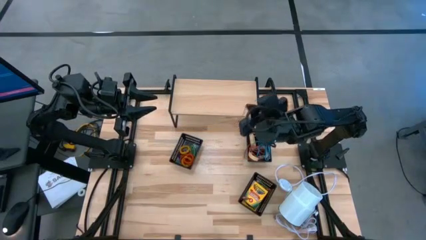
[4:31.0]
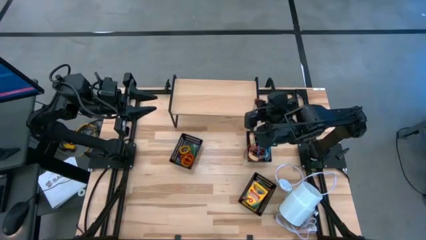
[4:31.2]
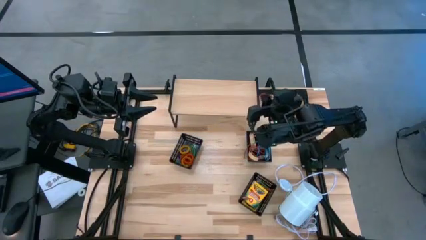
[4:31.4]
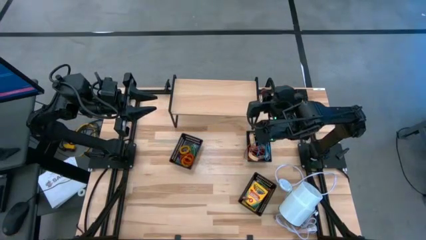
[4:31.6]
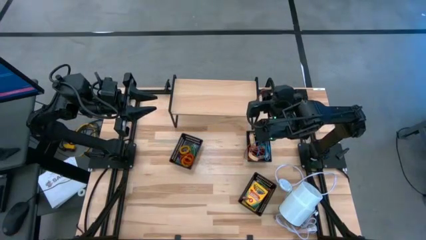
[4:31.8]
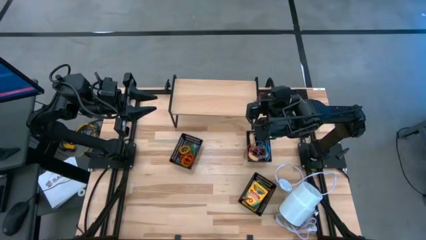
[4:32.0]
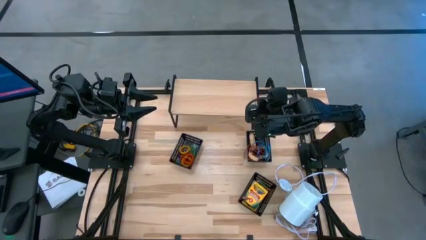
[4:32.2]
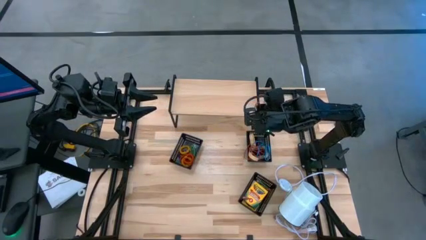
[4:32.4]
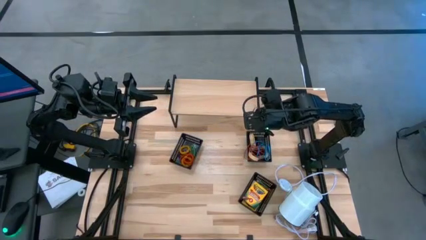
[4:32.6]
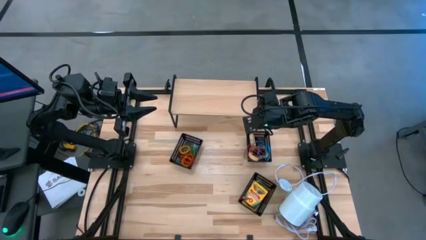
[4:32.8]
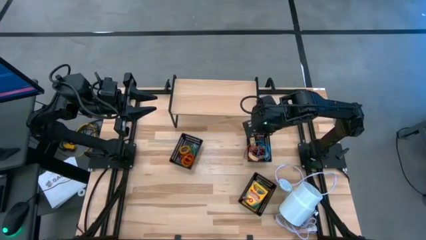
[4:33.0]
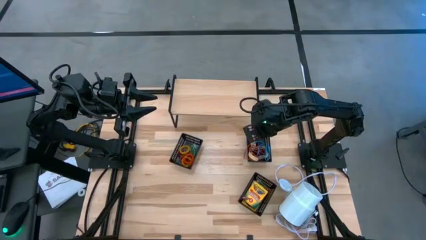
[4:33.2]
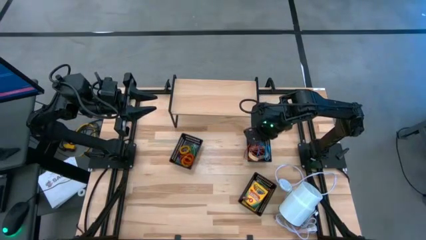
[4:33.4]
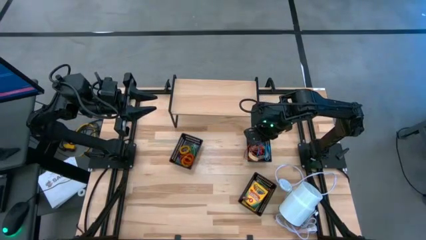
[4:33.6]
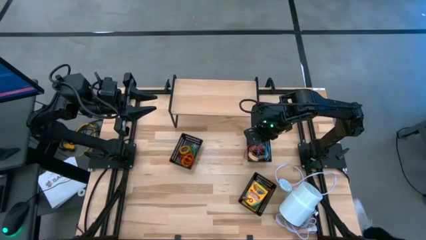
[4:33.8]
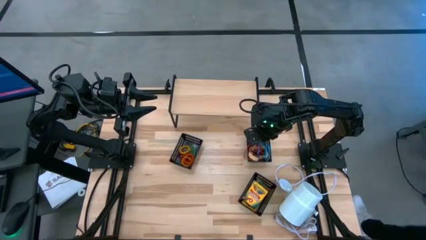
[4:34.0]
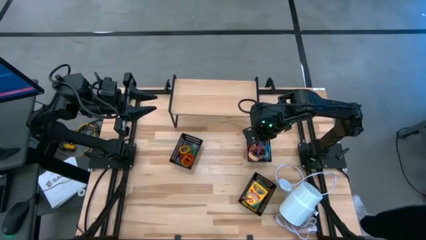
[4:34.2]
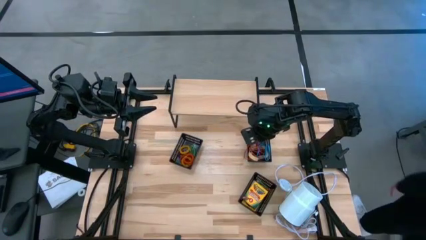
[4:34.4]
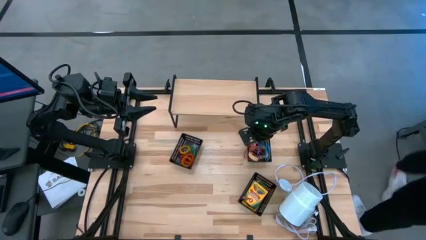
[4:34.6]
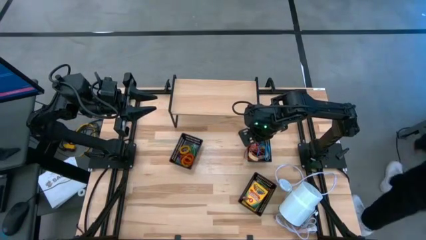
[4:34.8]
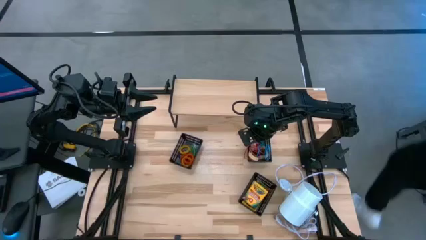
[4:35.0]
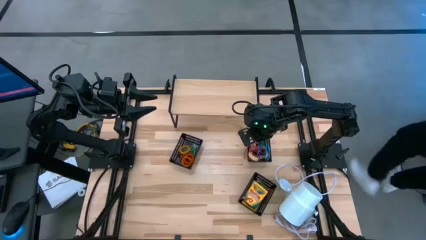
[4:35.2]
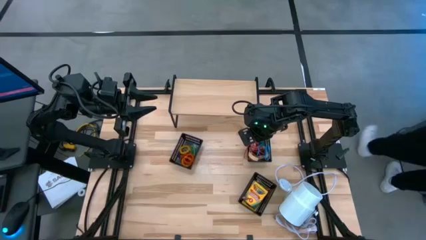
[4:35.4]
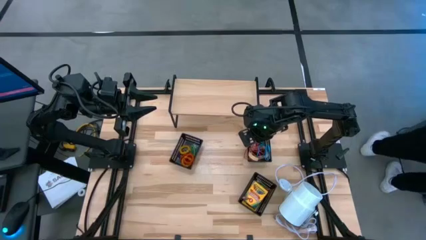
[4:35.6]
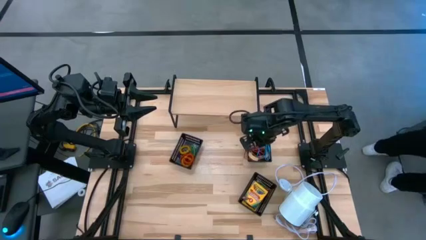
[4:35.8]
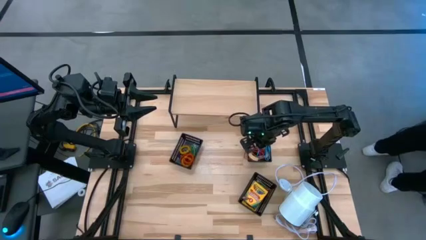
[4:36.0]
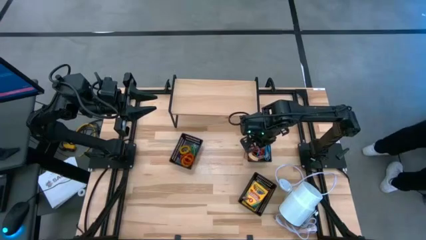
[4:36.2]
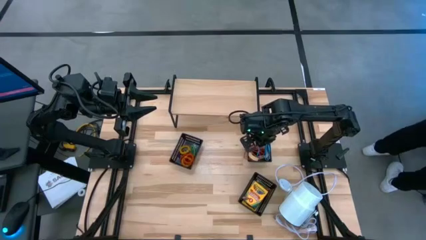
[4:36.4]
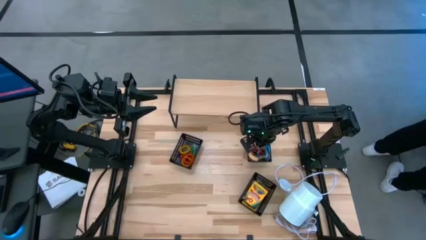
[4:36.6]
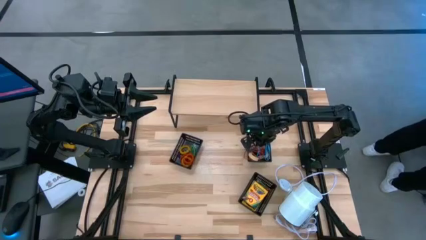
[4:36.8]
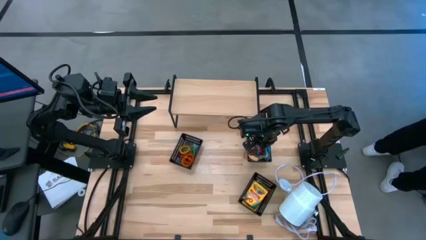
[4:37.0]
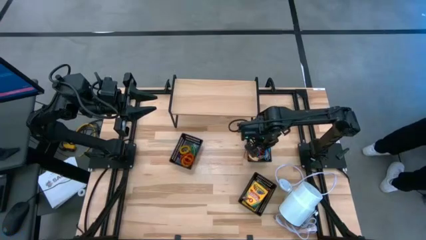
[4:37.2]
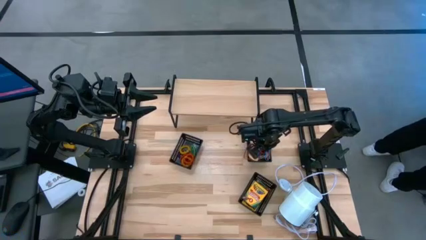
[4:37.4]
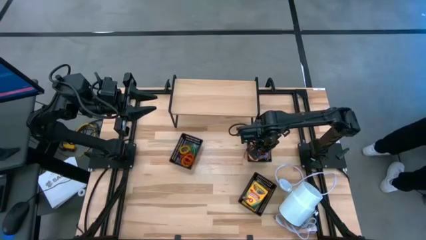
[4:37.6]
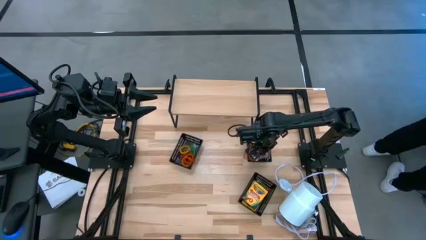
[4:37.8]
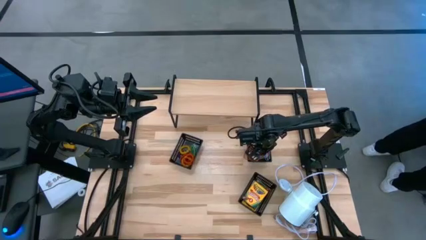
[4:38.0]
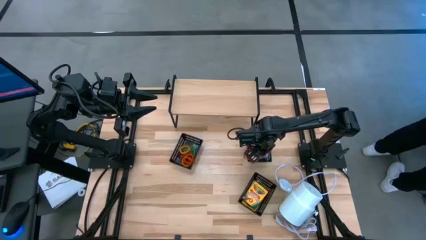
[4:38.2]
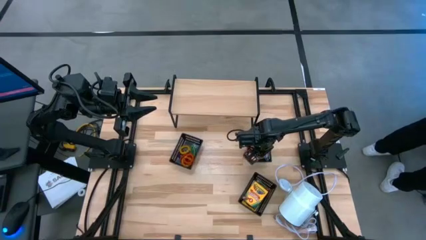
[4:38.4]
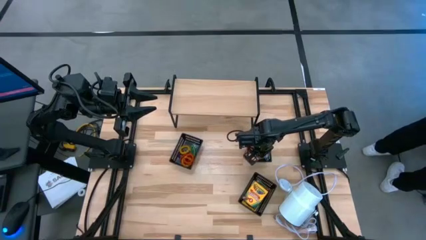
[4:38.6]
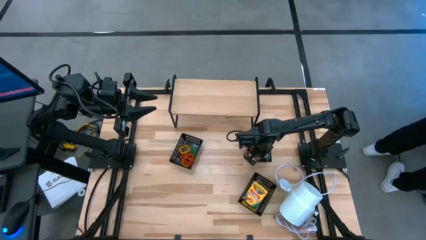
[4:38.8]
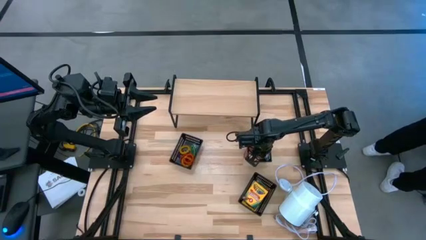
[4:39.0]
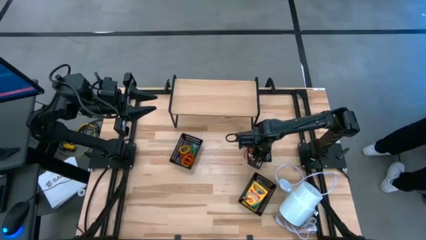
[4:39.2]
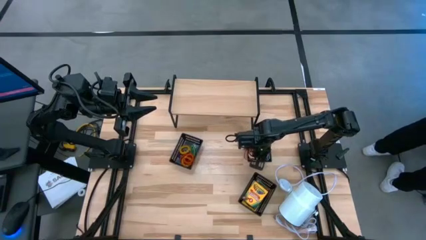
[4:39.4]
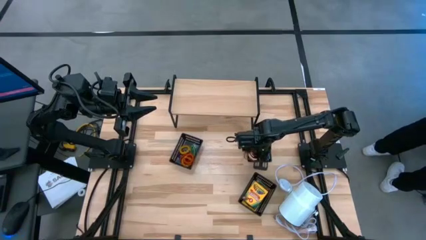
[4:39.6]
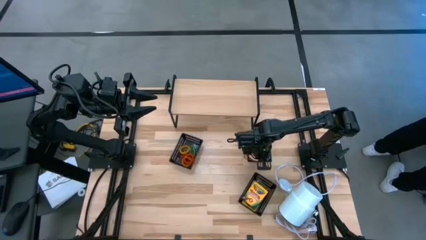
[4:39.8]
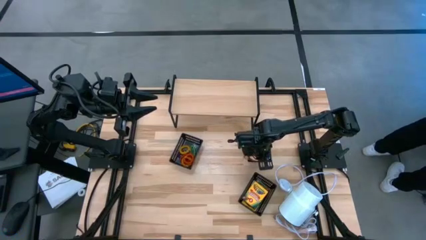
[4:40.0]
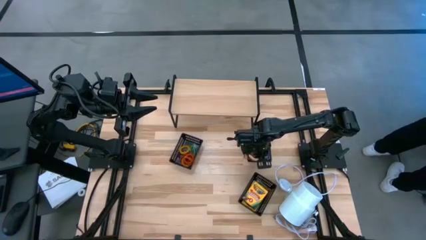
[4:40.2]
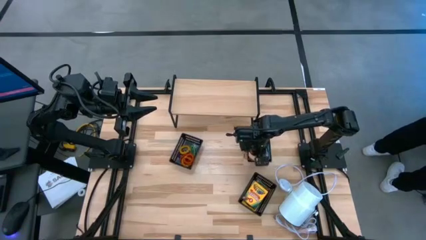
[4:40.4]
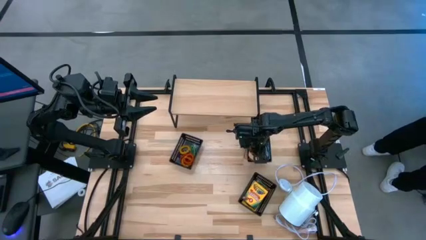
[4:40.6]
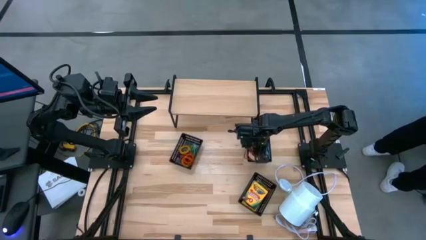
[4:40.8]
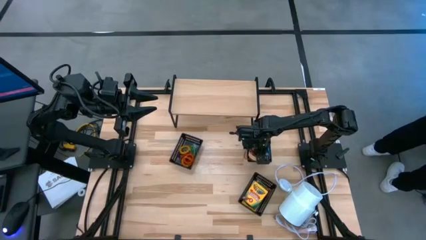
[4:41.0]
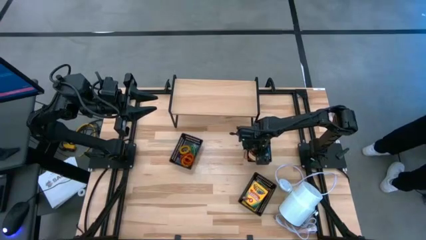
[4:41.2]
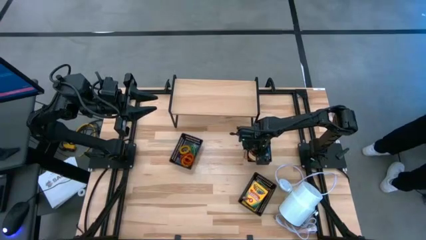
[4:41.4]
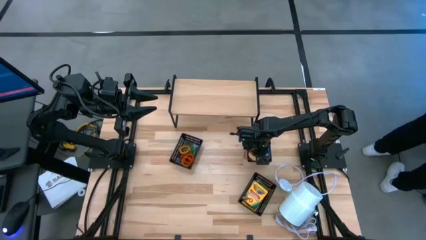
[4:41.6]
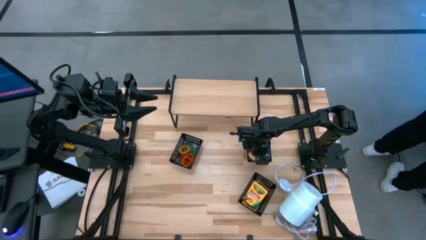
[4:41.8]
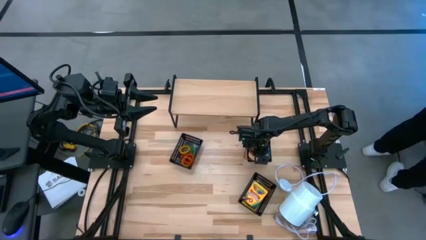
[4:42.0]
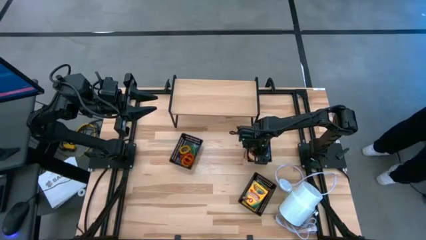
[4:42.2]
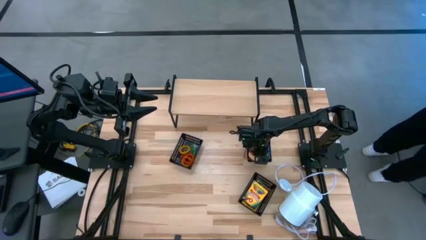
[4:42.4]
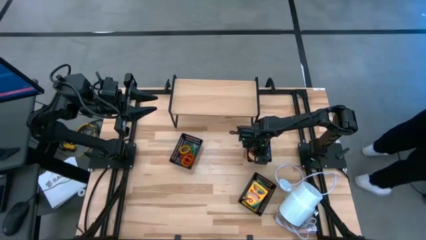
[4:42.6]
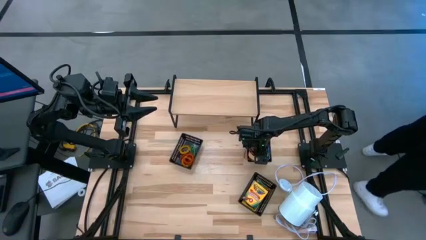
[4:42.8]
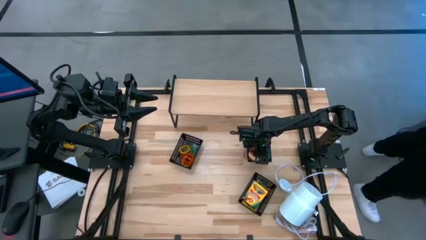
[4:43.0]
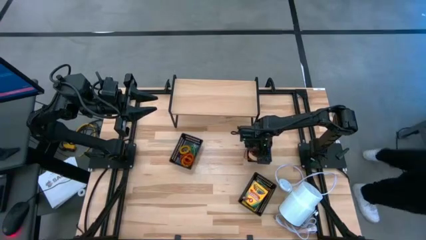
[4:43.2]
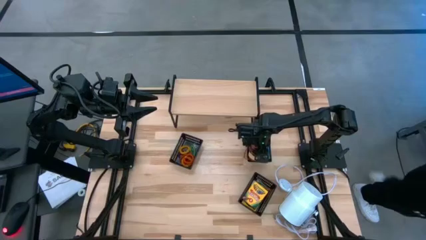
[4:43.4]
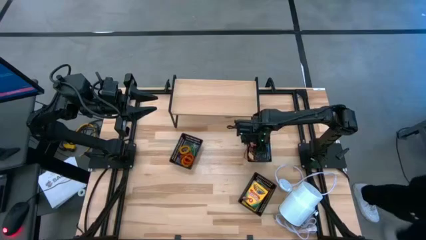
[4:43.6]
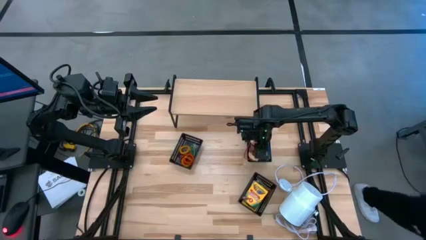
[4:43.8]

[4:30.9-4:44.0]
Task: Pick & Place Office Desk Supplies
Put the red rubber band into the top right black bin

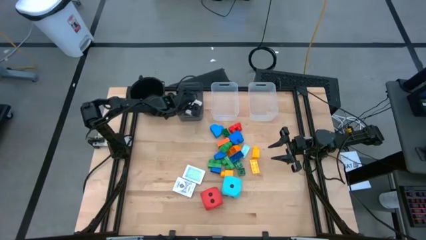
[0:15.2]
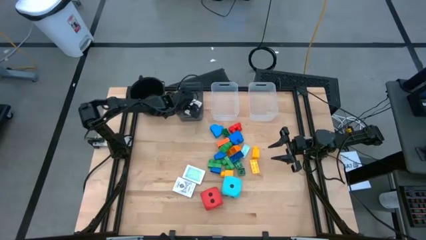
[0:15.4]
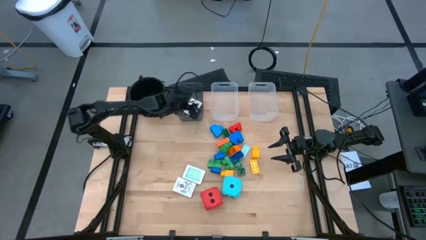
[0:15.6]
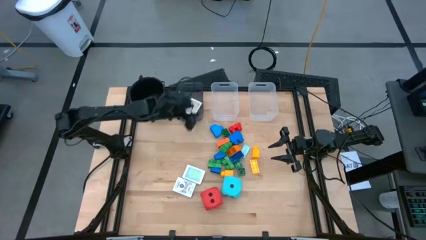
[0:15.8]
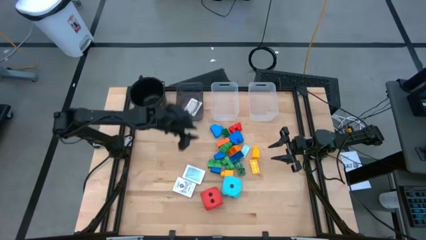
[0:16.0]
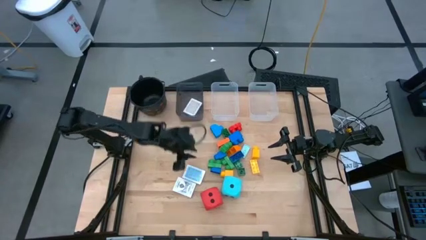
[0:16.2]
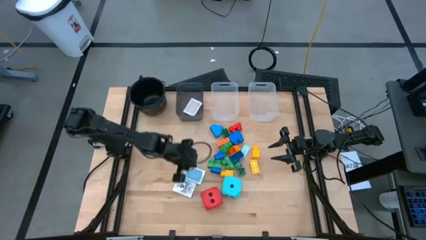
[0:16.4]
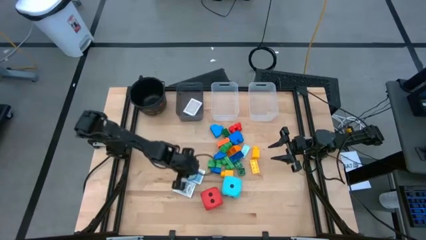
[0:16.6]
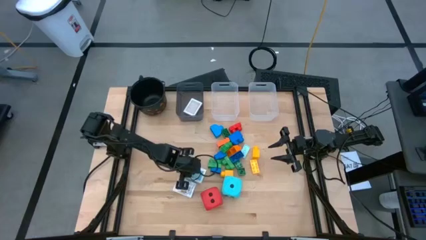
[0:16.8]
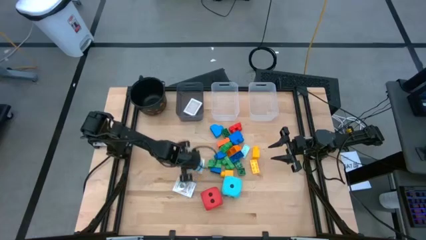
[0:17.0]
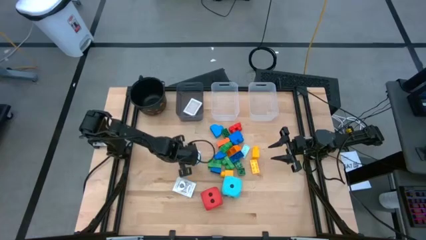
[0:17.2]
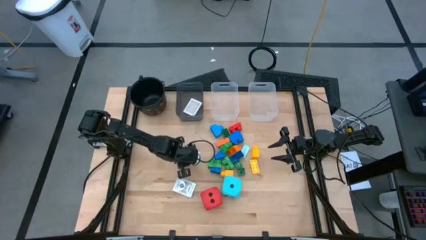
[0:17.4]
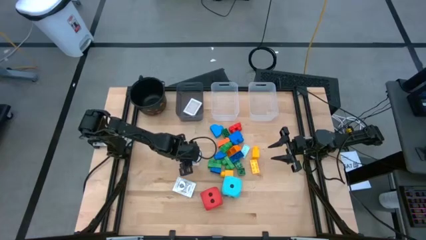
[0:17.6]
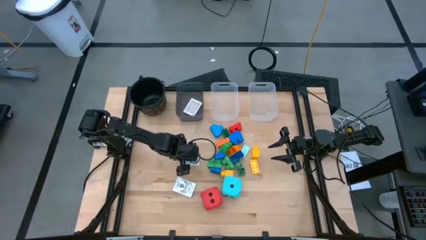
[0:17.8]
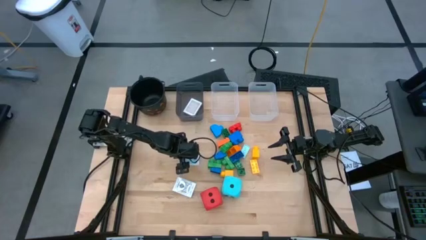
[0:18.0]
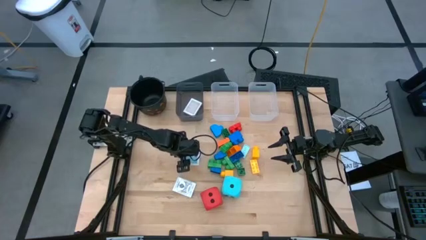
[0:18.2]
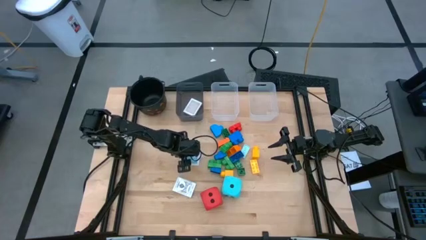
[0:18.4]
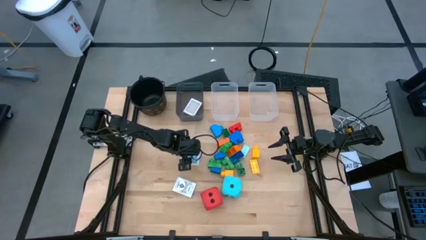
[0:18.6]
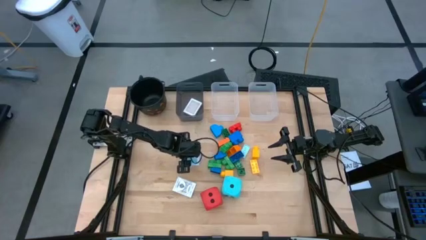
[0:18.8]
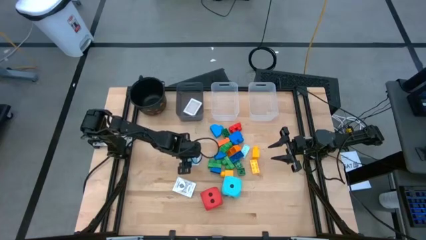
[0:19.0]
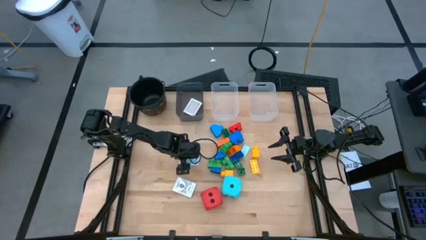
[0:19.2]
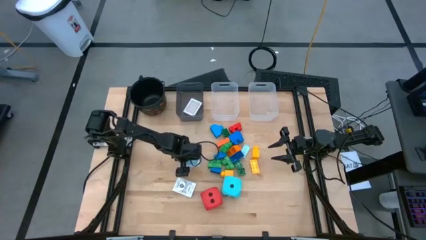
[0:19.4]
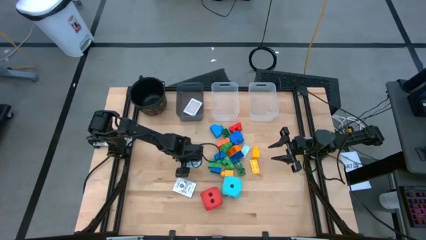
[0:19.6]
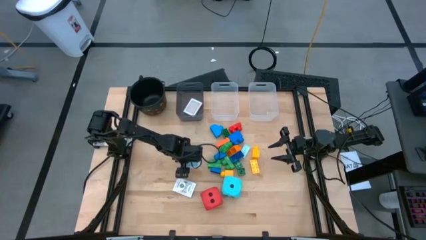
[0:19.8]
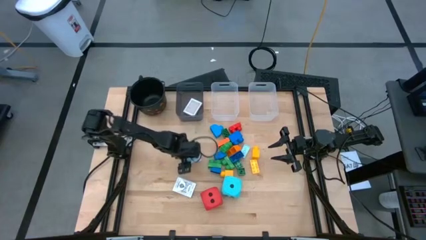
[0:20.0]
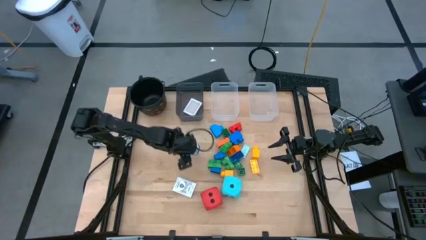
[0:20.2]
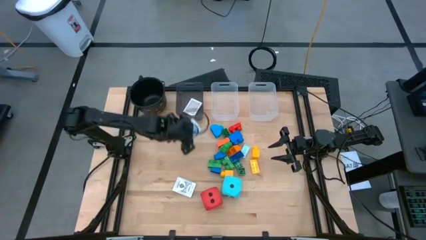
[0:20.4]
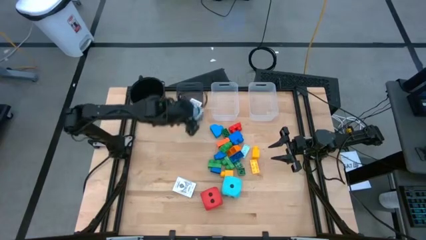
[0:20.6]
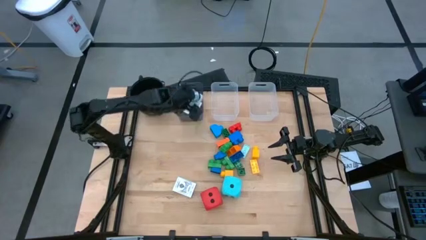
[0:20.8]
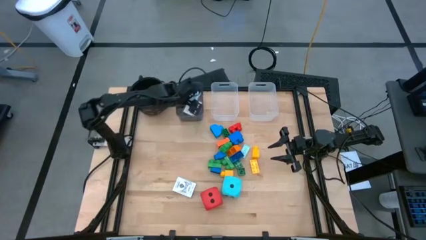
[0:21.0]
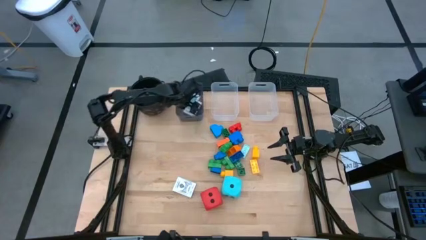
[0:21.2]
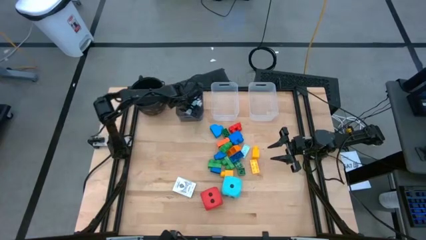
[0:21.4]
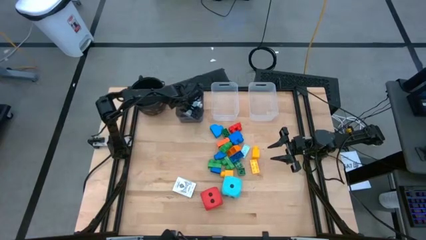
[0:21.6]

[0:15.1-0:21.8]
Task: Pick & Place Toys
Put the playing card box into the black bin
